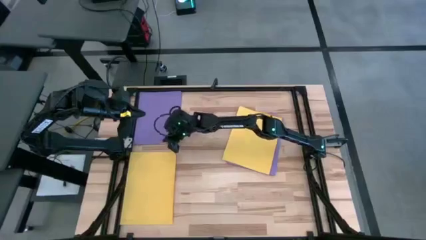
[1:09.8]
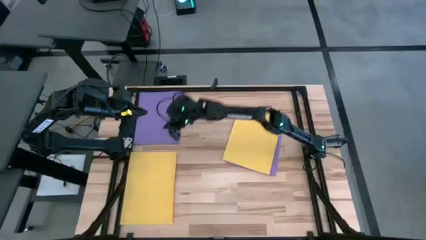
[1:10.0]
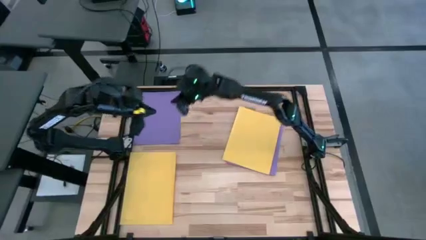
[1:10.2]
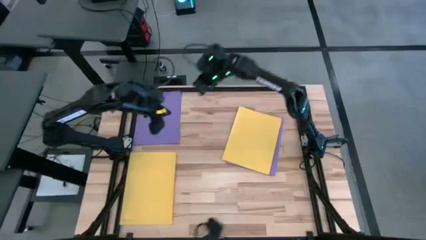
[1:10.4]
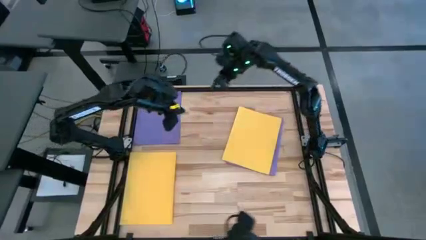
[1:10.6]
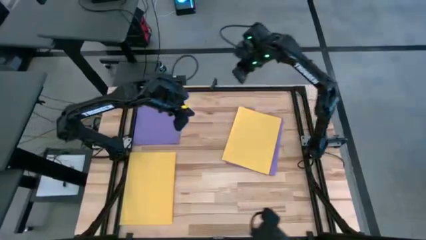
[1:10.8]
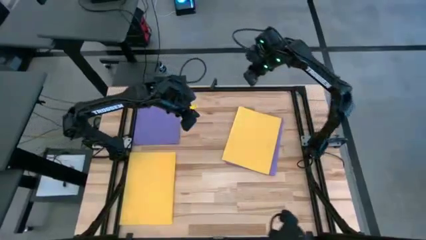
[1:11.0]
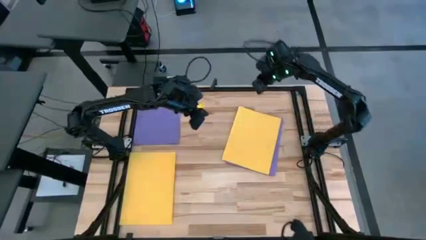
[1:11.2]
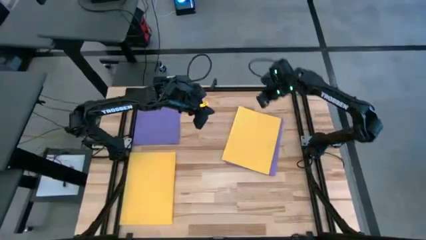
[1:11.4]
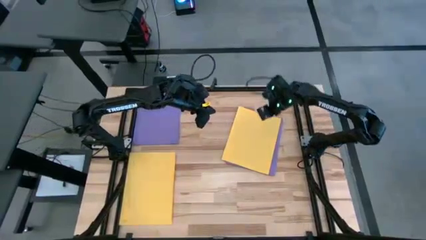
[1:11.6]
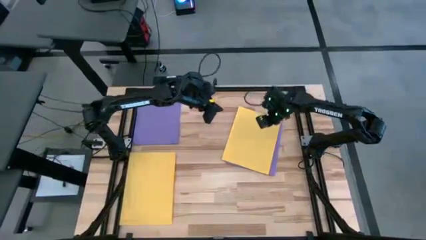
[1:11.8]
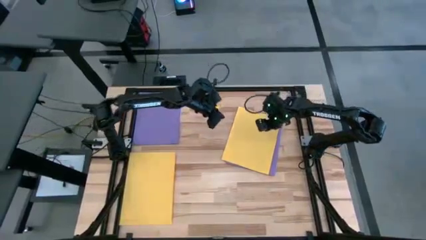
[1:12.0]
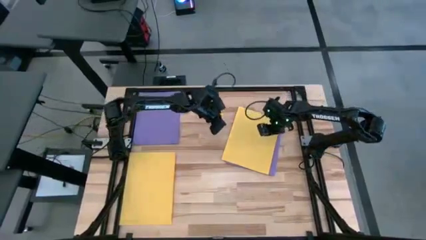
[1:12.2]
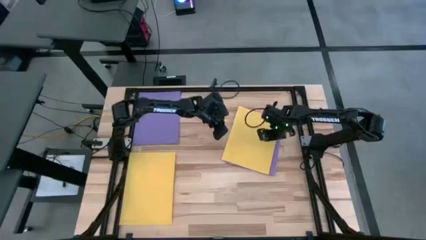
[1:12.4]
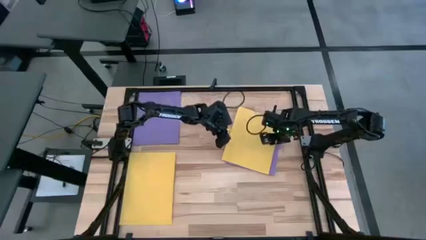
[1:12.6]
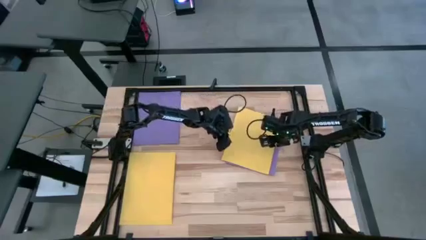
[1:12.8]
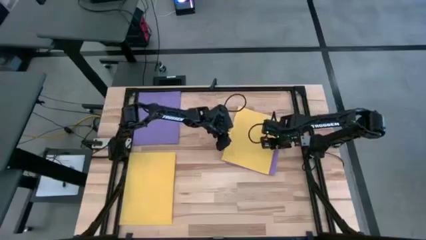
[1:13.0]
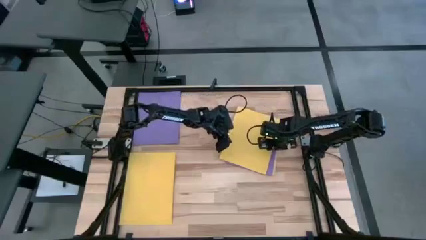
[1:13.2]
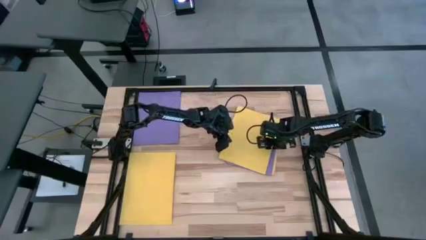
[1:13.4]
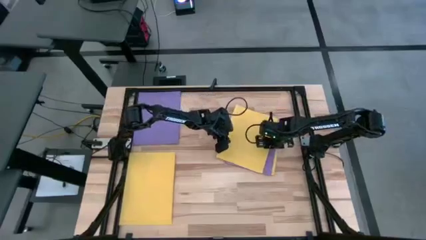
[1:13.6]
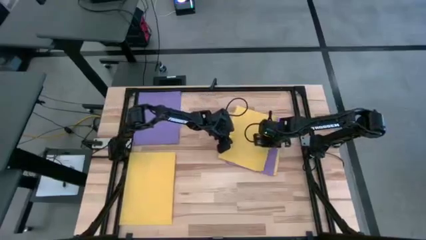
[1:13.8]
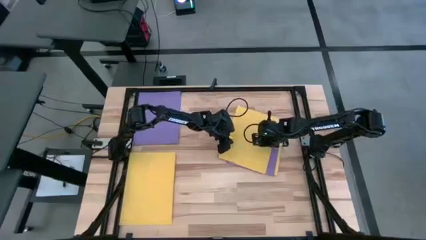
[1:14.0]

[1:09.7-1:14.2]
Task: Organize paper
Stack the yellow paper on top of the other yellow paper

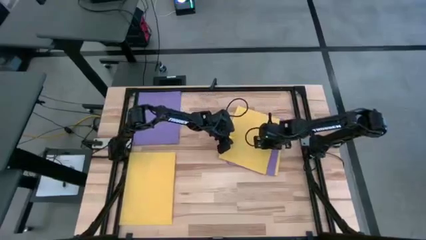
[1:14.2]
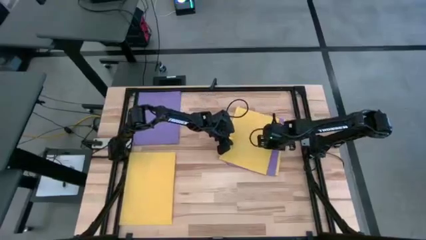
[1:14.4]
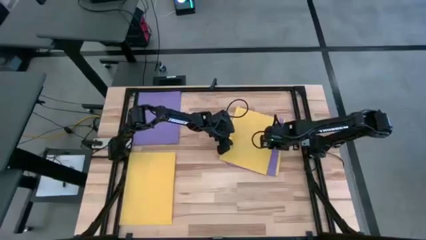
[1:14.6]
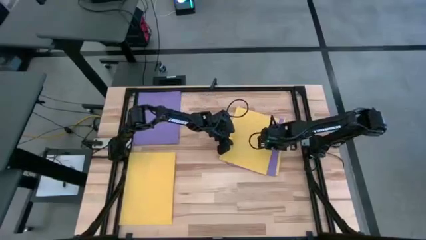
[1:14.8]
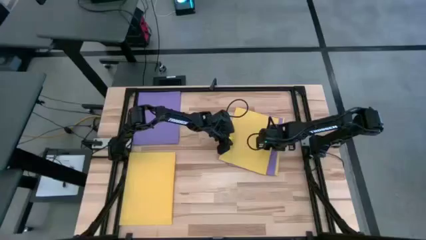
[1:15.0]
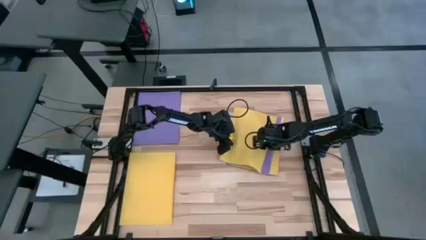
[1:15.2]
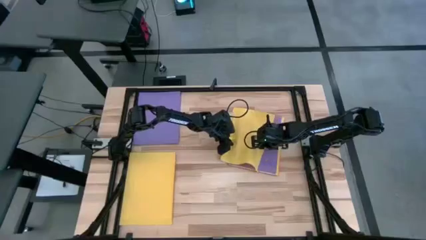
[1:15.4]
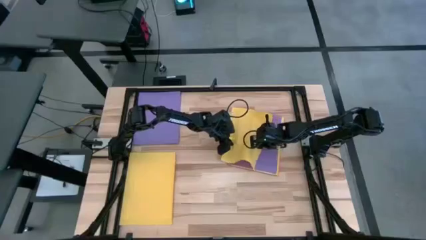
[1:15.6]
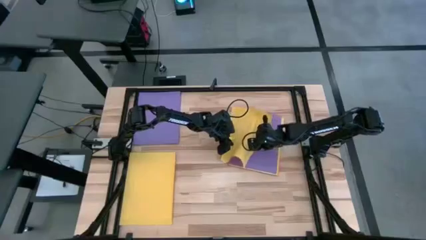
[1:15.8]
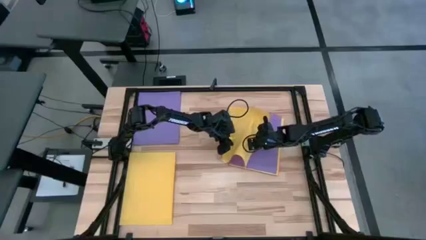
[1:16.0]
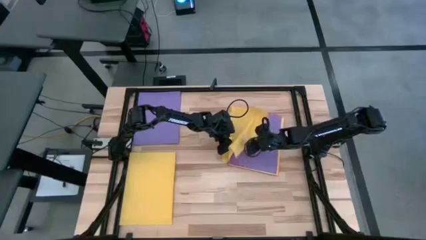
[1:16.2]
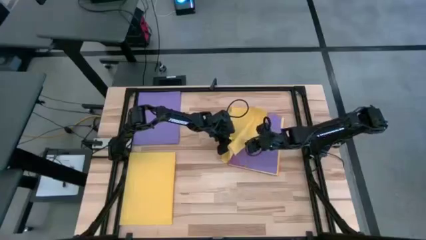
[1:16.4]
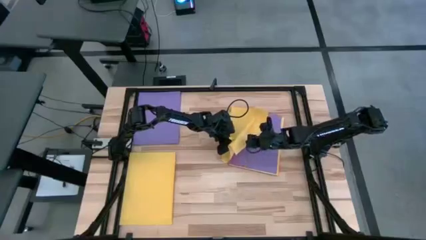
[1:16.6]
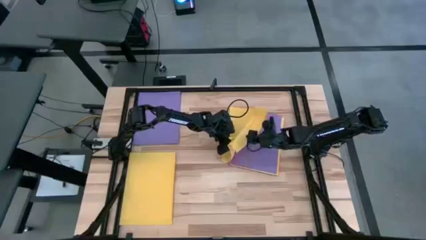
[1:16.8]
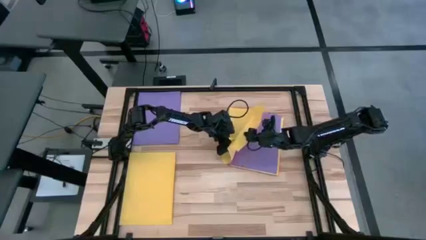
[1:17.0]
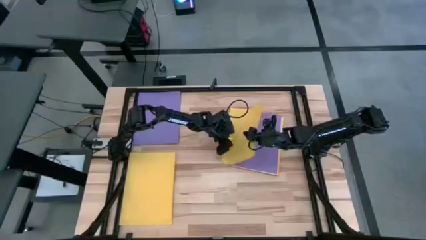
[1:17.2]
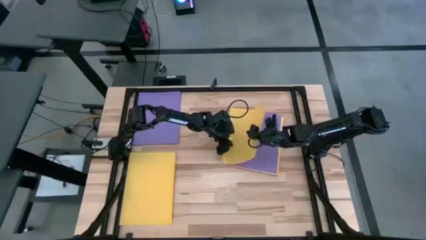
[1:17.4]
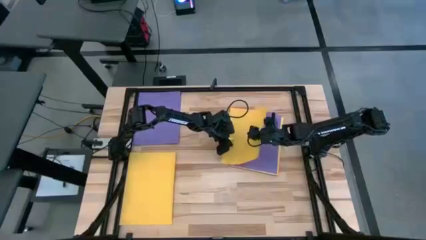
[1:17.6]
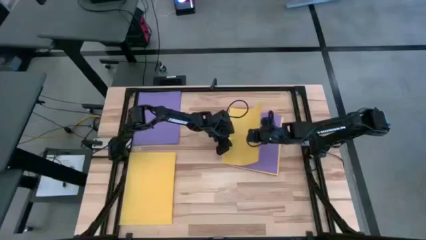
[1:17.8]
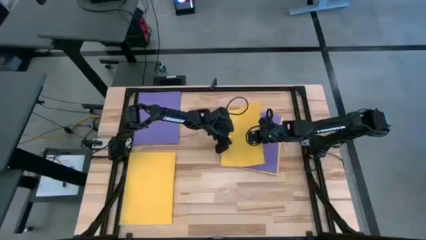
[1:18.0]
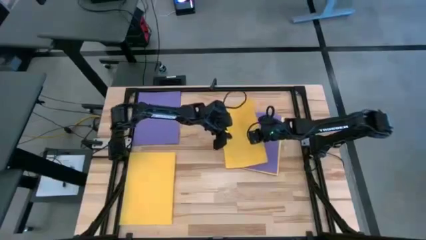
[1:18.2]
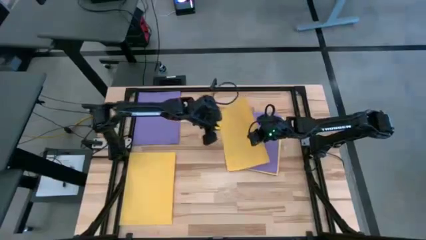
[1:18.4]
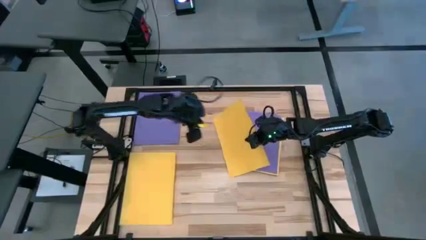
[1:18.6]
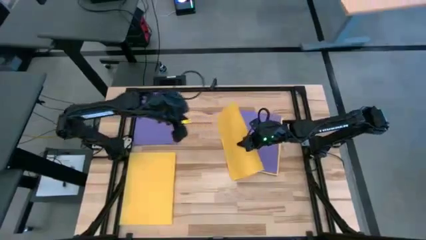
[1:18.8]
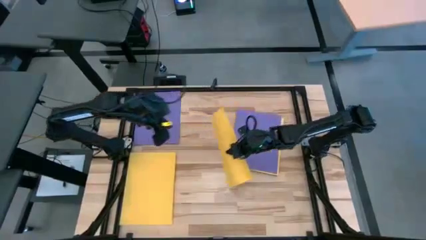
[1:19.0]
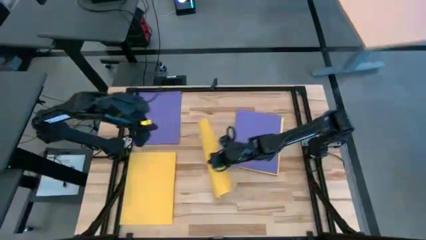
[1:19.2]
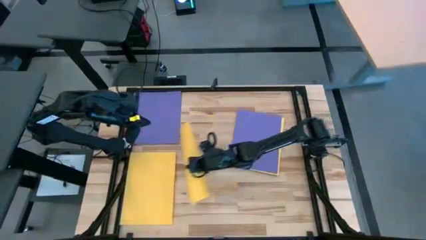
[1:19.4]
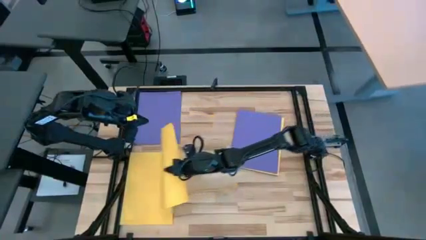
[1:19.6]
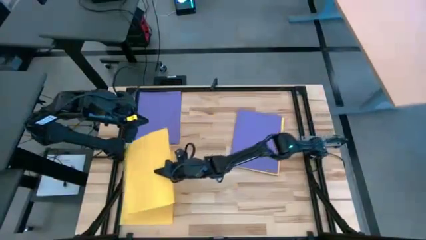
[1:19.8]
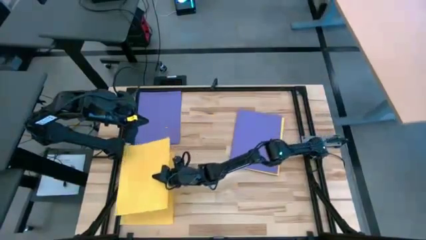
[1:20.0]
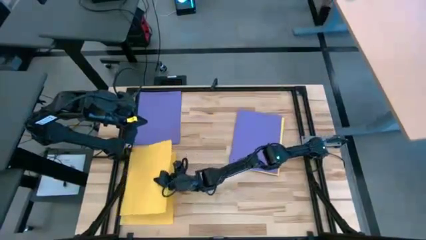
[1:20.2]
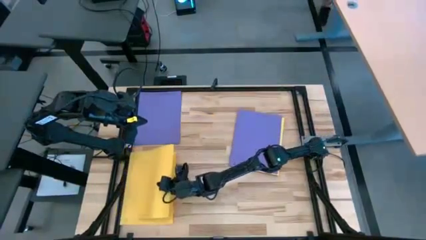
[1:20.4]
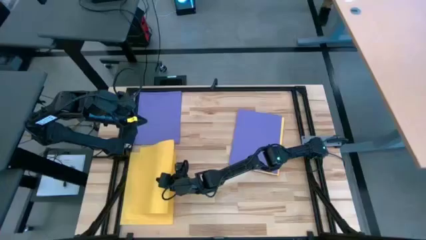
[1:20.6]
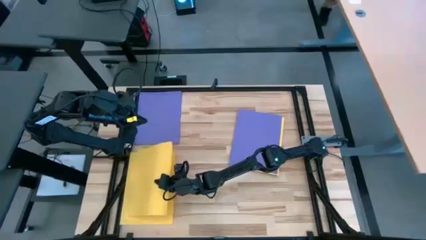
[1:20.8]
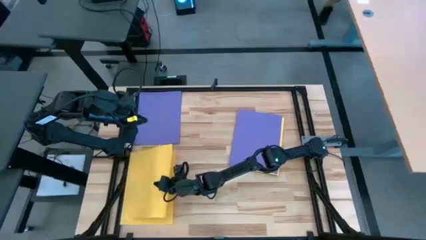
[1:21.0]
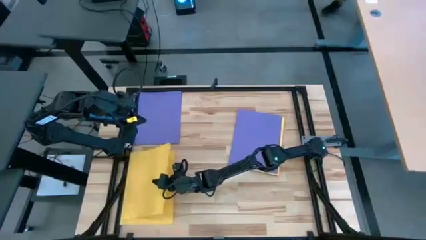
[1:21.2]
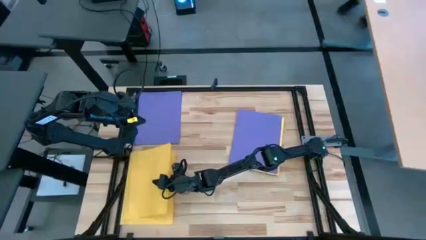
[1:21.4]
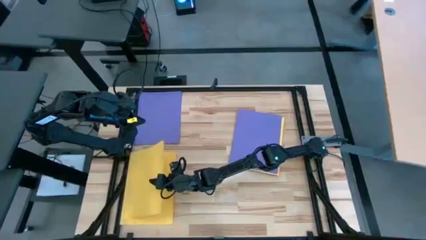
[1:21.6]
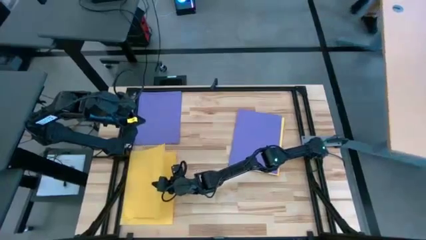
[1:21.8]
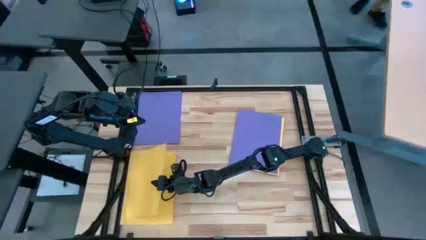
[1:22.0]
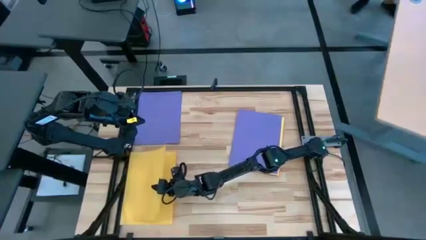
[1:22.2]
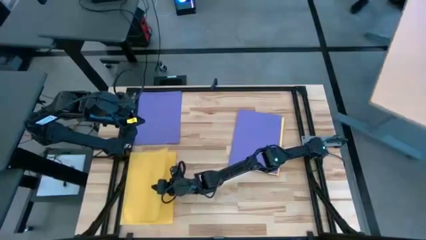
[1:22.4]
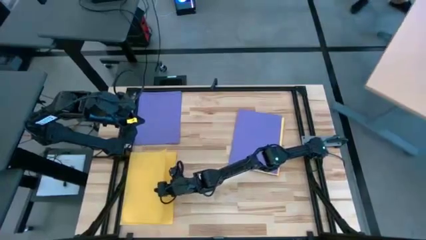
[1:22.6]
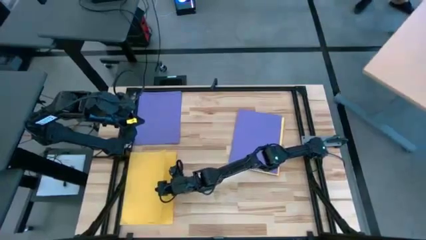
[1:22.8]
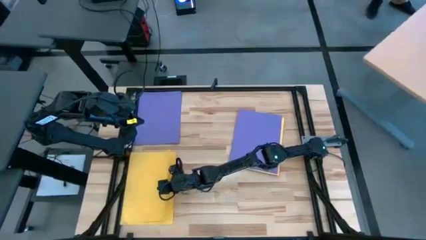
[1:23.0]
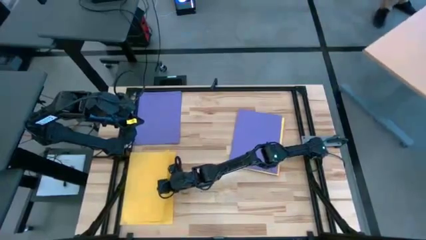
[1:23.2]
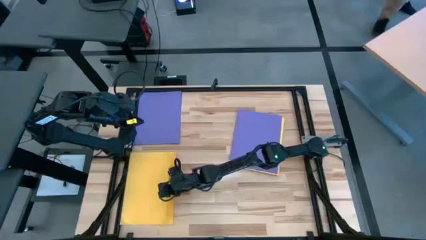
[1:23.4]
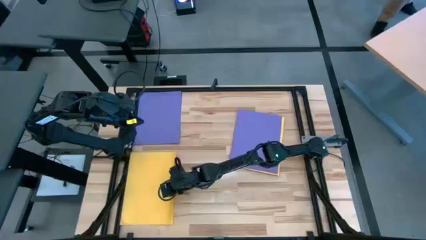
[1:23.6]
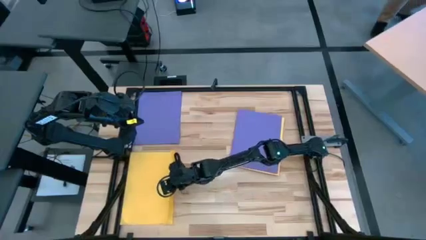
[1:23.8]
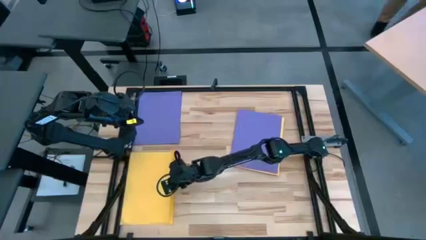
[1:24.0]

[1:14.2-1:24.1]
Stack the yellow paper on top of the other yellow paper

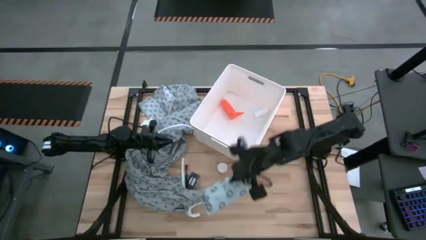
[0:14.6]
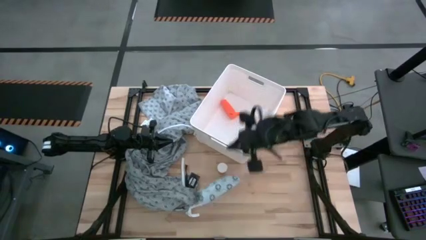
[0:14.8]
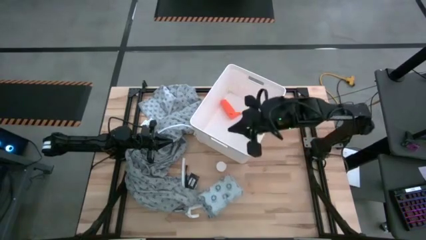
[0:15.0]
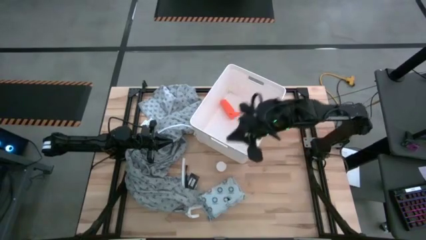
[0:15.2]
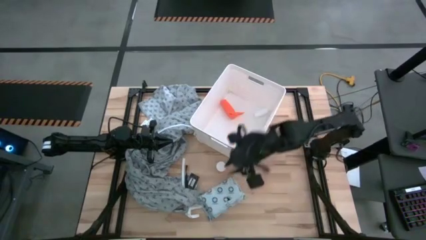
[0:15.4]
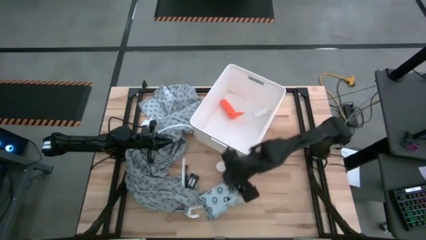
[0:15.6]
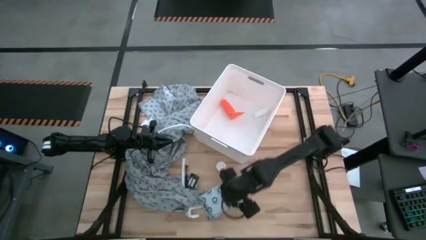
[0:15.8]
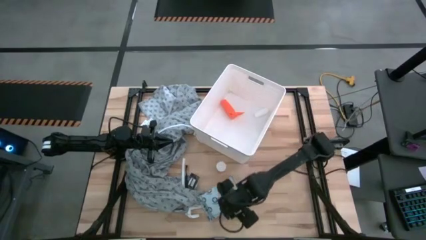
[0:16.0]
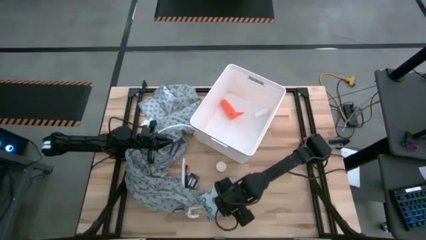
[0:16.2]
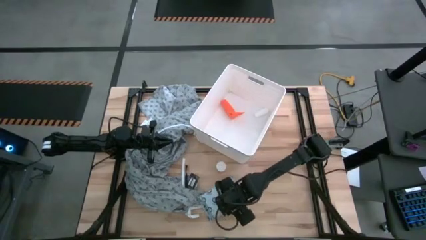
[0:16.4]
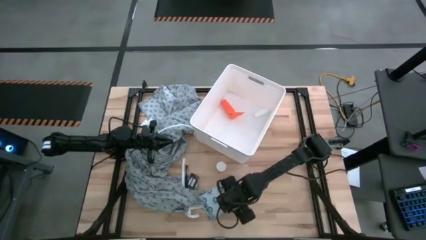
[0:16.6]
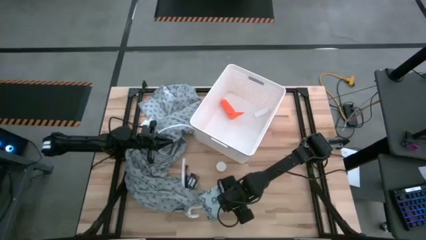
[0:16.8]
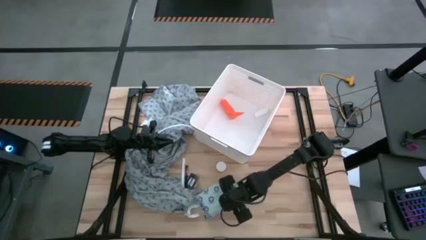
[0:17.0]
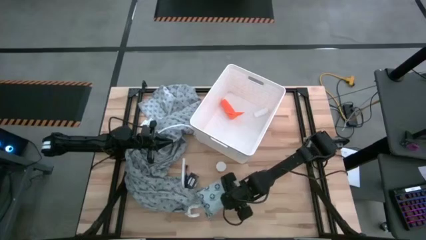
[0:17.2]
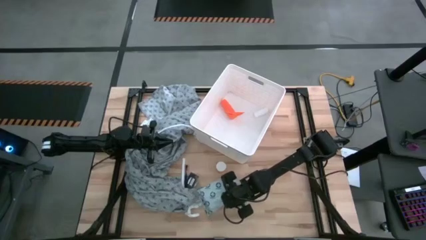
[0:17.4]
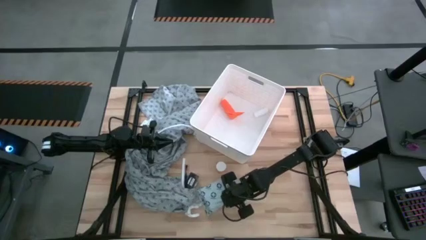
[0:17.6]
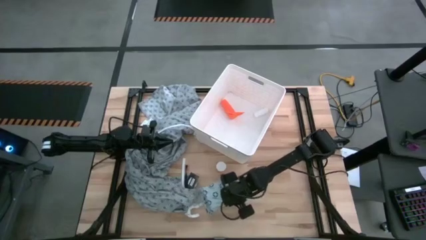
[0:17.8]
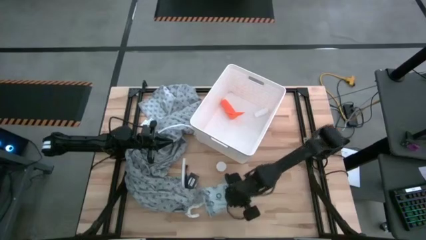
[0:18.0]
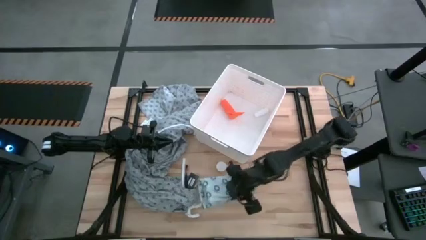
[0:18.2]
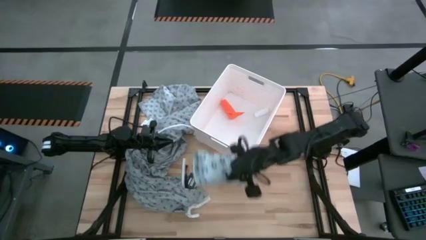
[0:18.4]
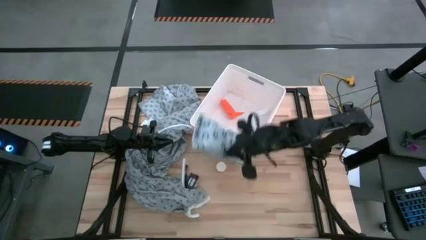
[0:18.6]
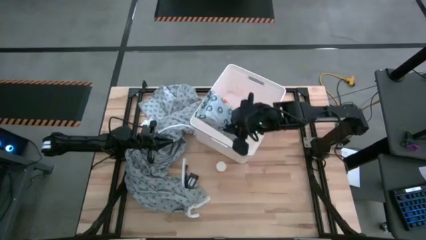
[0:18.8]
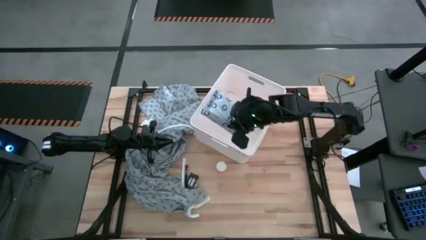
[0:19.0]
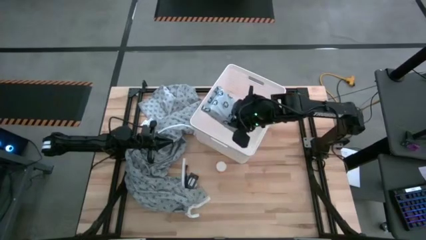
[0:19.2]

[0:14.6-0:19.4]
Task: Pick & place medical supplies in basket/bin
Put the mailer bag into the white bin
